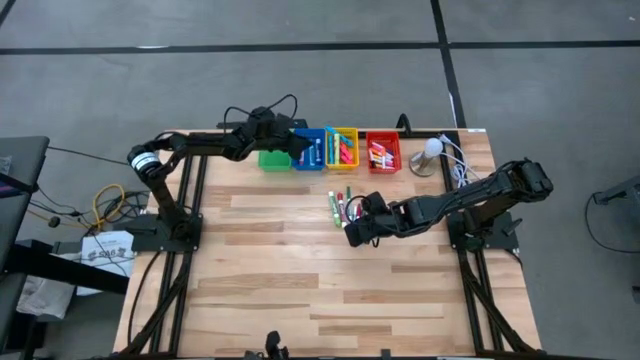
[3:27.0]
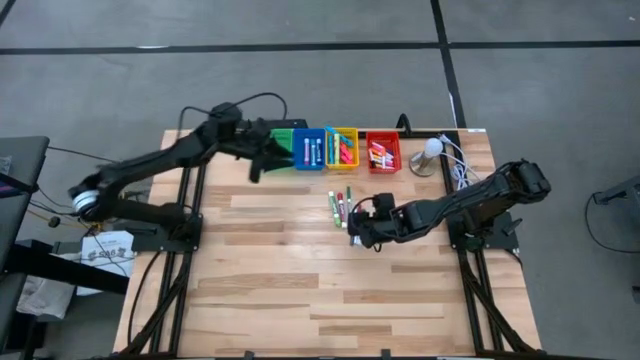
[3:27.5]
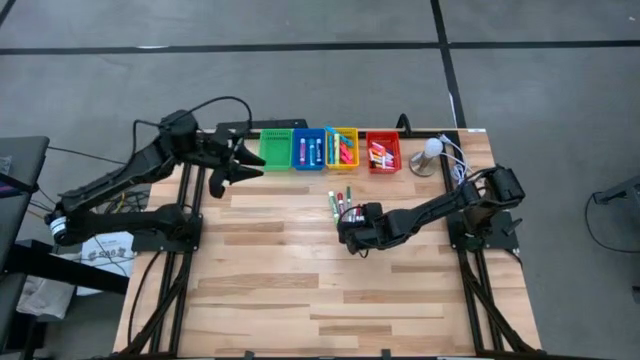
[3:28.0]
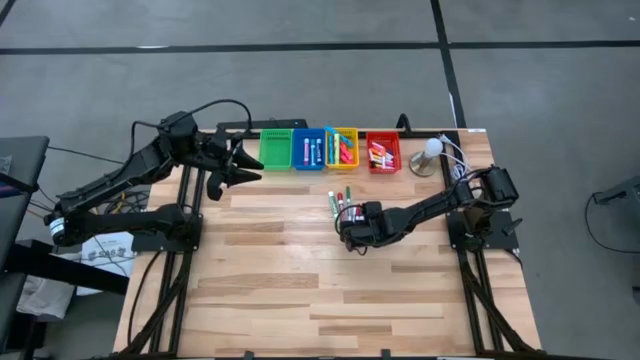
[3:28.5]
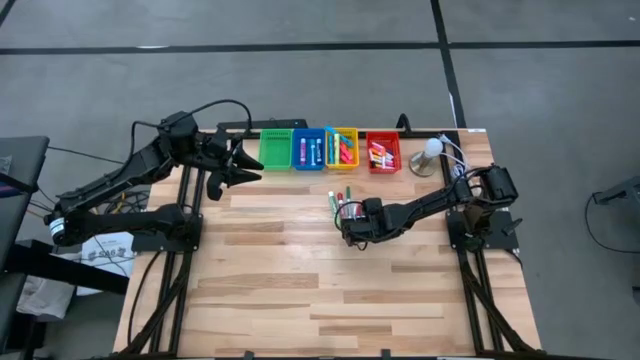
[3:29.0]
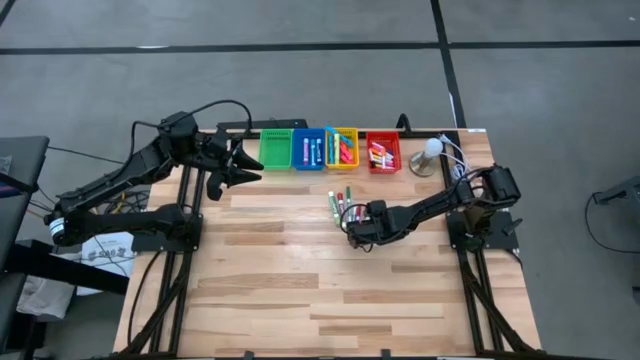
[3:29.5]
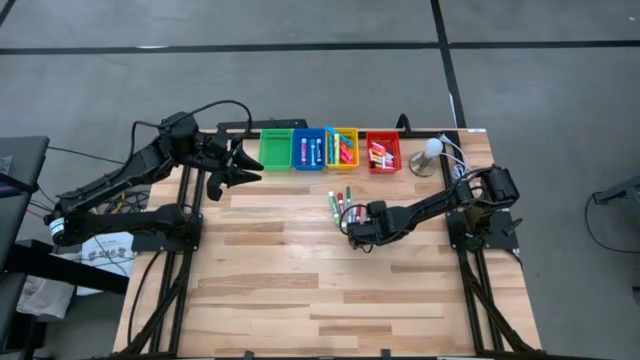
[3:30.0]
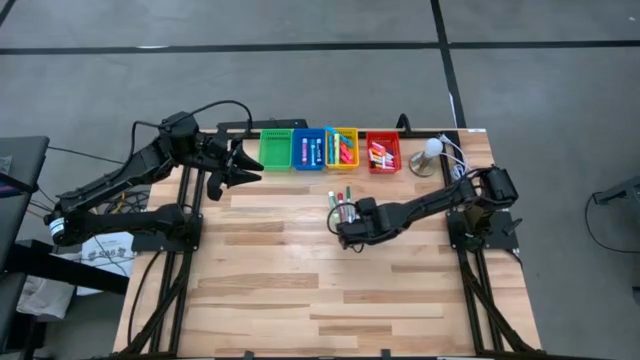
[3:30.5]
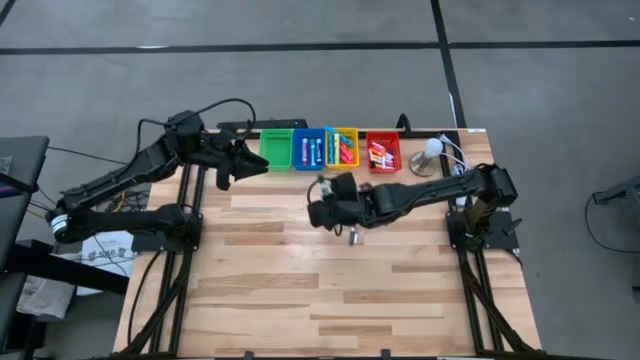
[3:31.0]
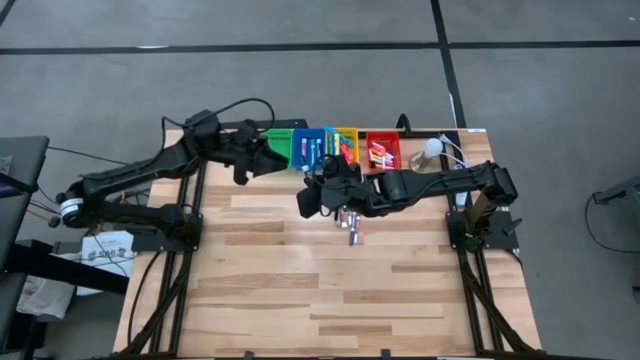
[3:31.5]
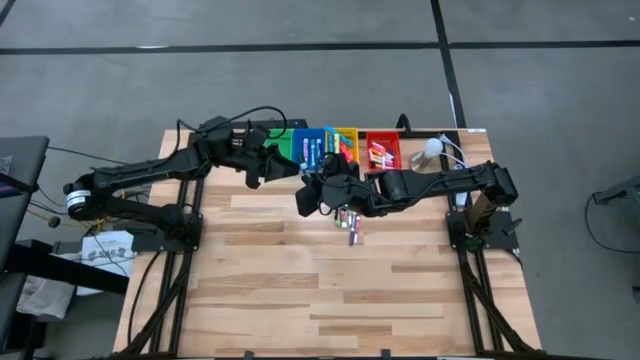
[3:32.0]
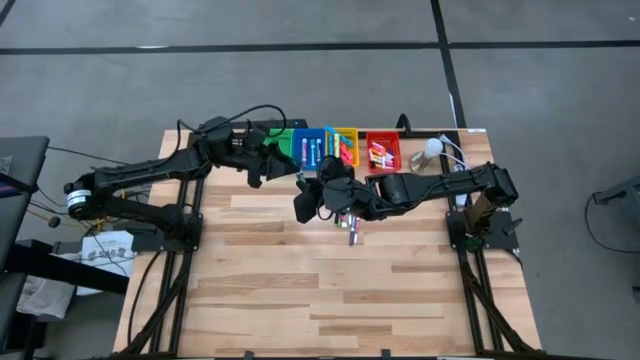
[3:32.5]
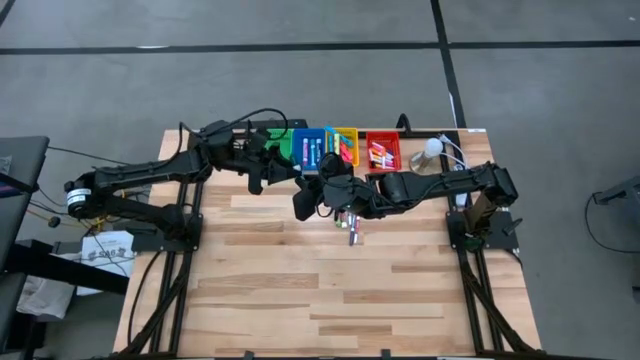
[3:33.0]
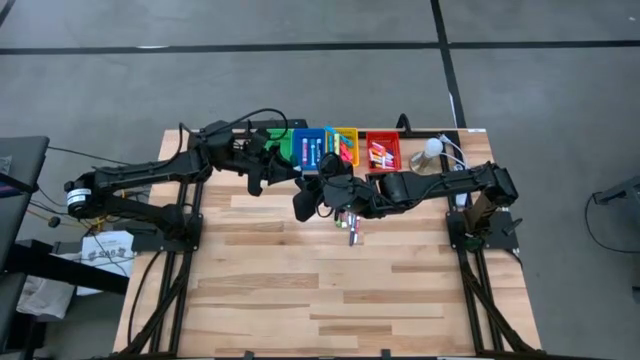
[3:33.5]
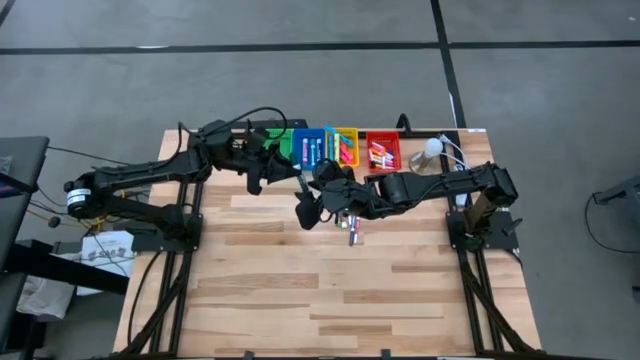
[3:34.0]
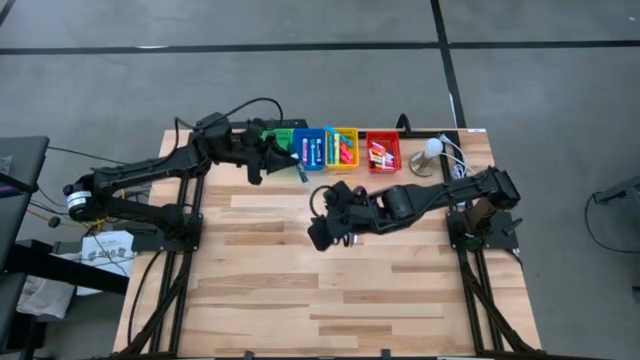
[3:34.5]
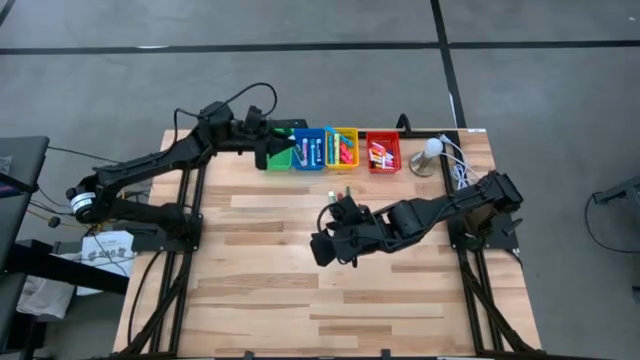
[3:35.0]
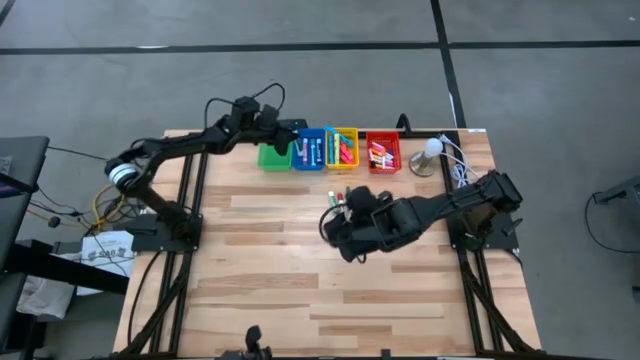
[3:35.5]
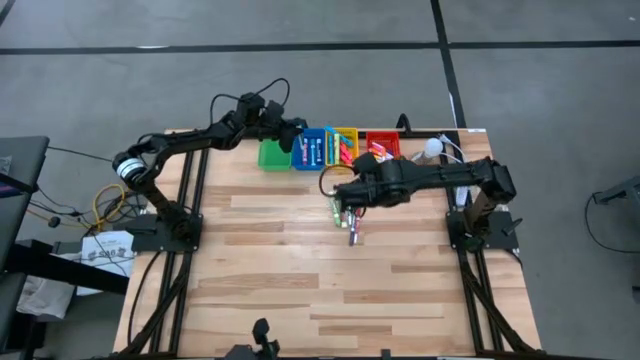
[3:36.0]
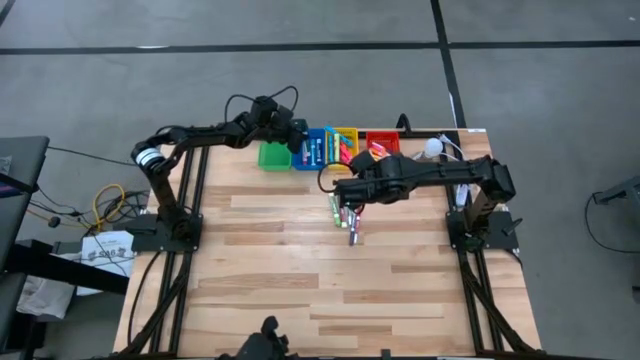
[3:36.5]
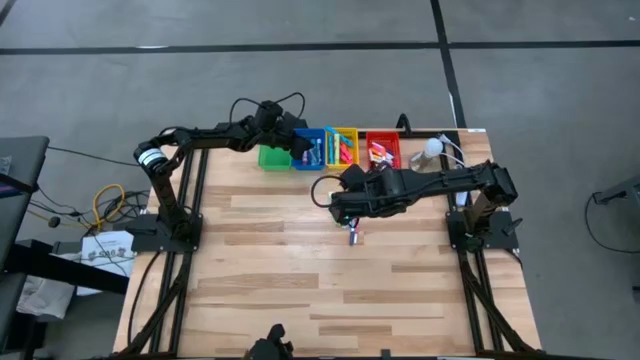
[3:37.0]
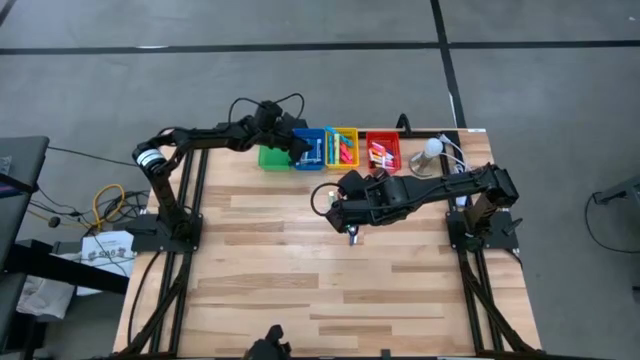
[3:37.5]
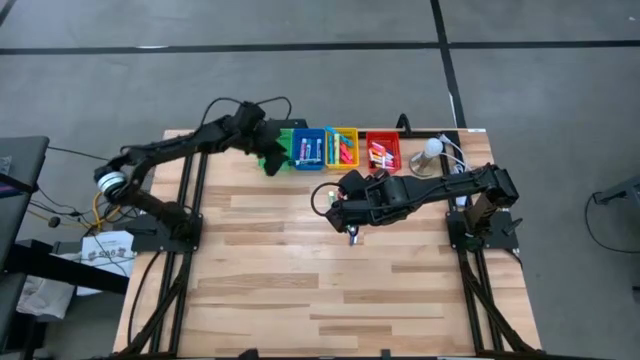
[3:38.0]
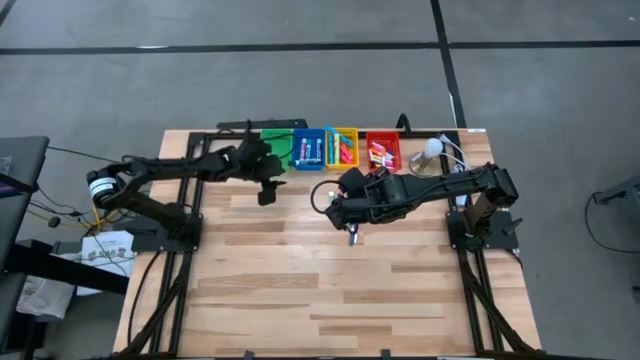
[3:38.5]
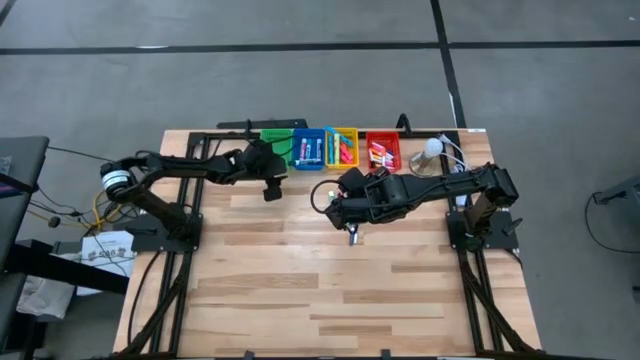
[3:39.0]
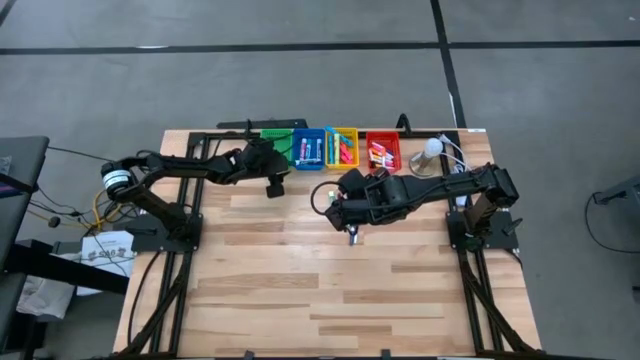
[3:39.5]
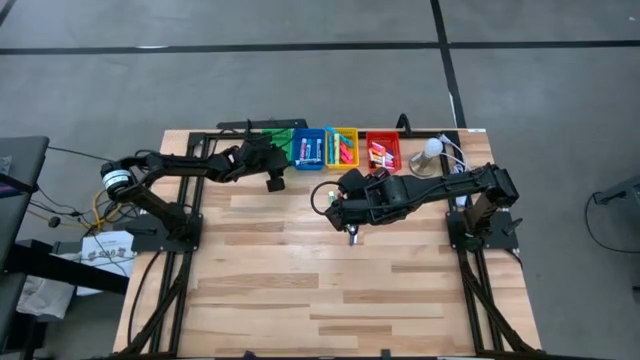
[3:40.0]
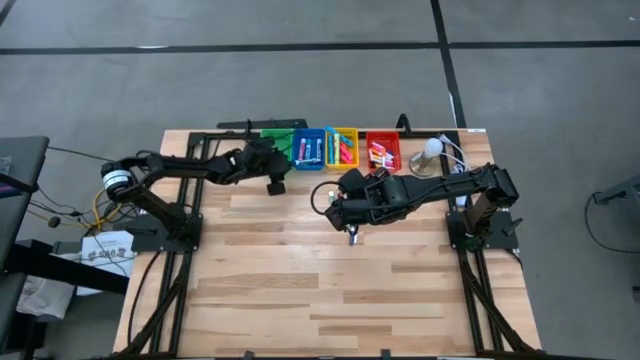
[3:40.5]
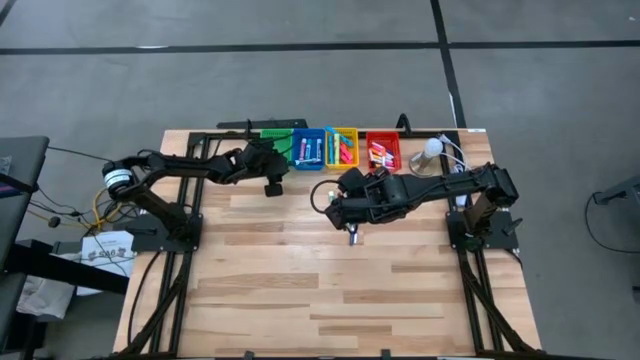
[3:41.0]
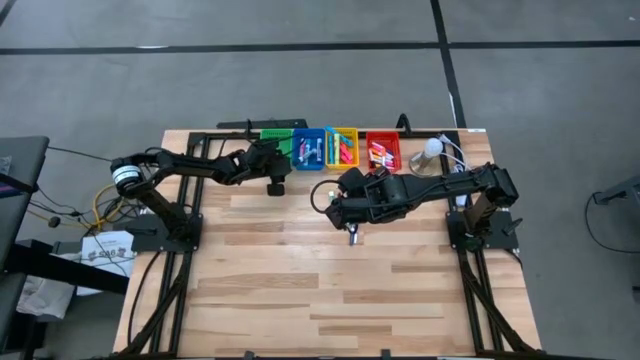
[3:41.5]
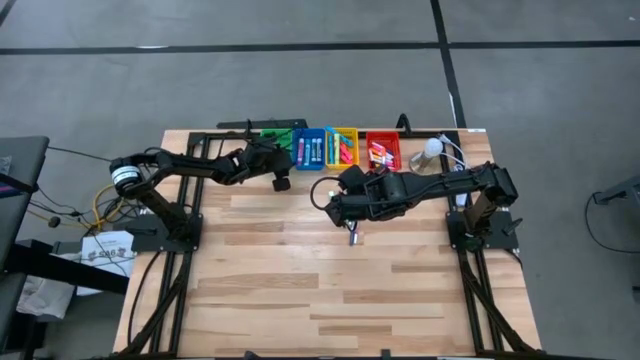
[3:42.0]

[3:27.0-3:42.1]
Task: Pick & Place Markers
Put the dark green dry erase marker into the blue basket

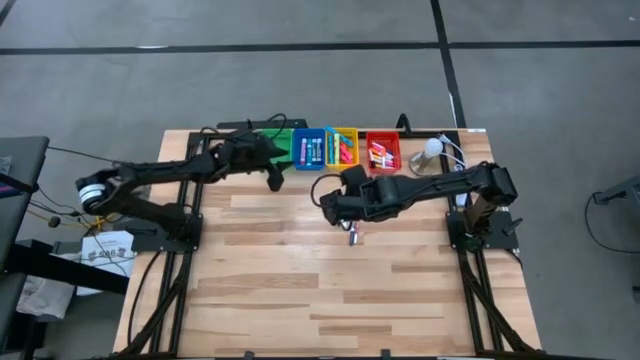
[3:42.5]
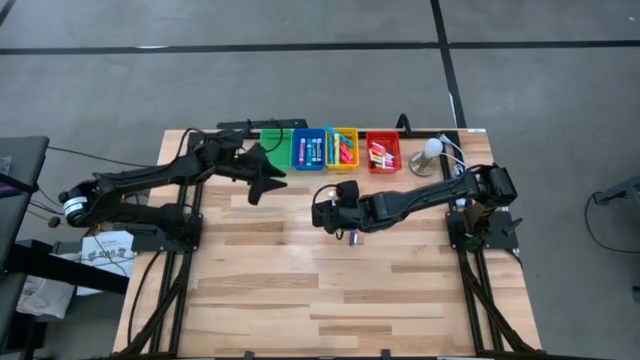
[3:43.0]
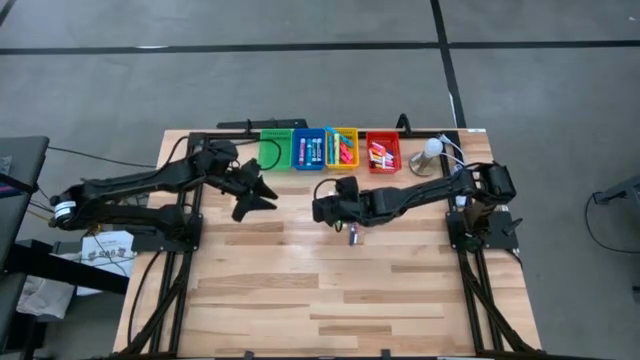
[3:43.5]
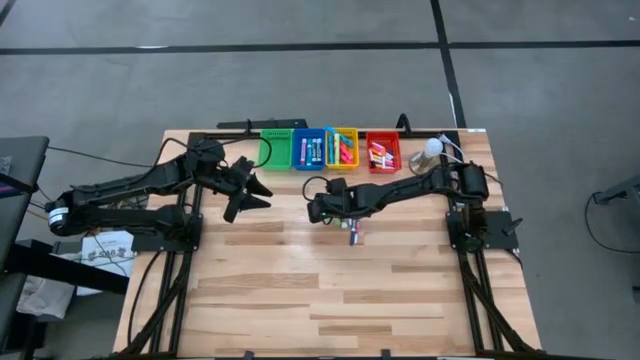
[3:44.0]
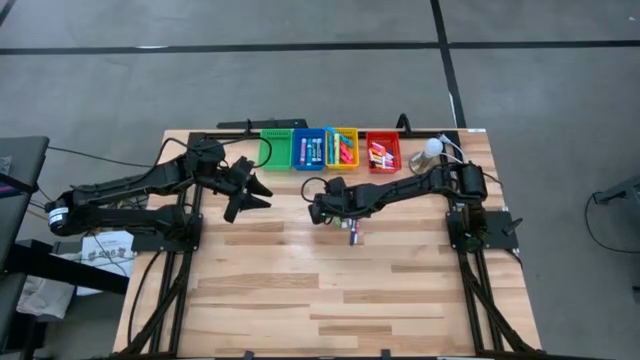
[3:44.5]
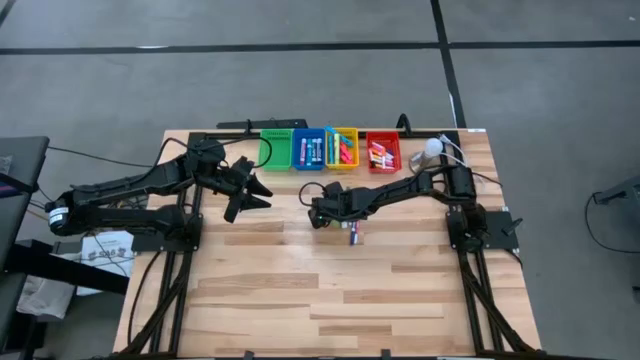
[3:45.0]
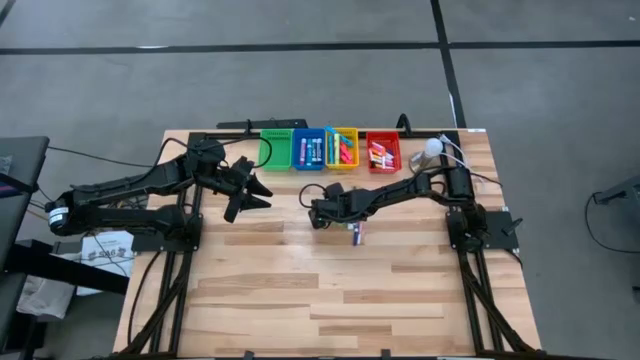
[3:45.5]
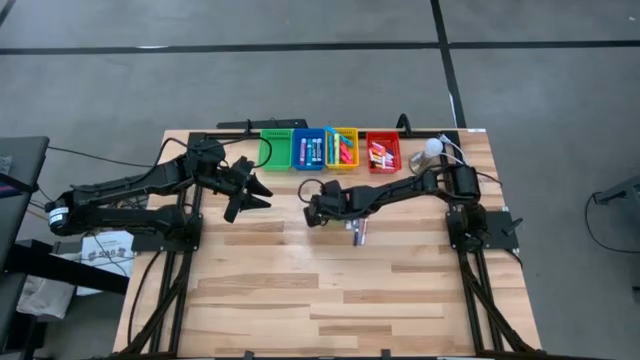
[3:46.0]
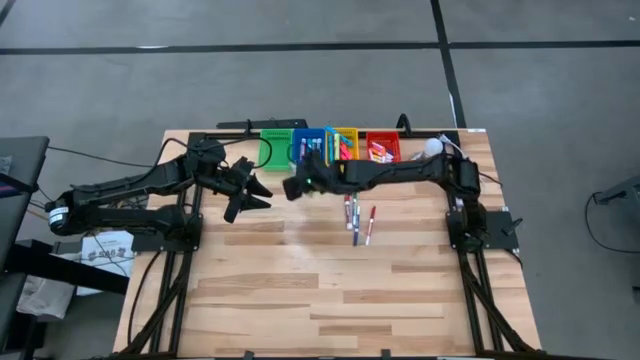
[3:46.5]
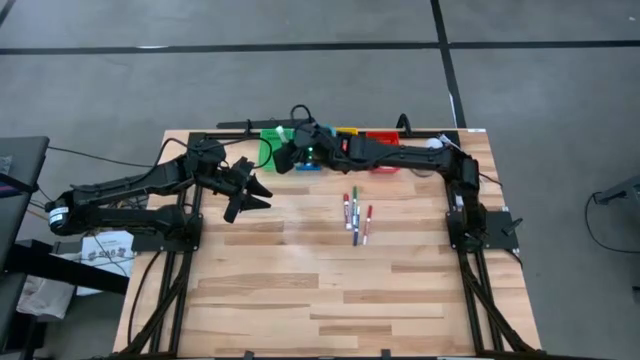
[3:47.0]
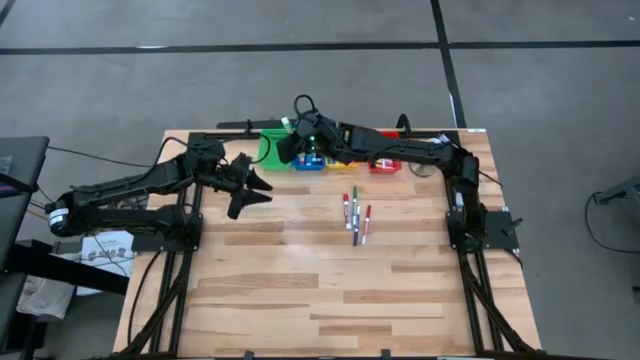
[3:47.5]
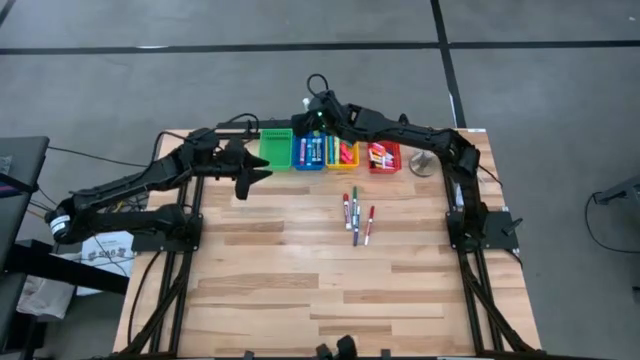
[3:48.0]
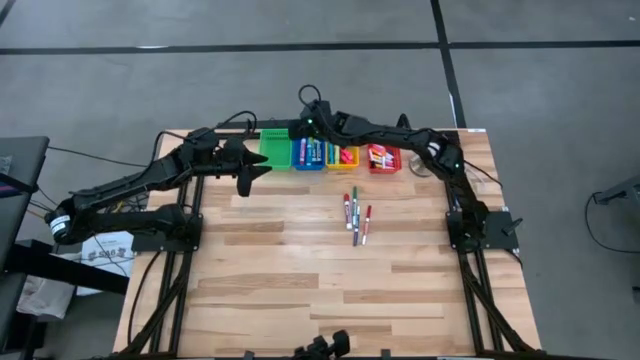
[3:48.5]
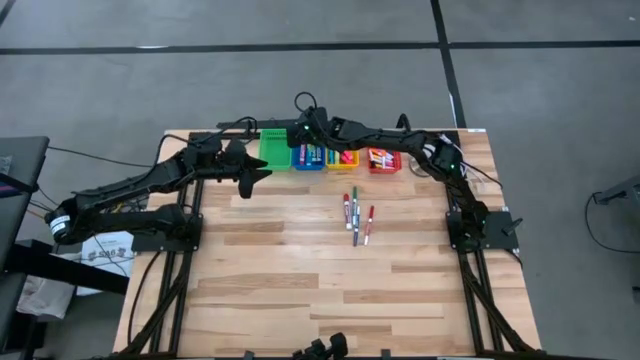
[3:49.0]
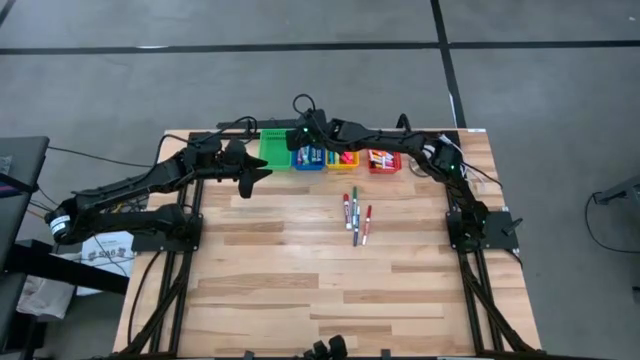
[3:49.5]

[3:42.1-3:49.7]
Put the green dry erase marker into the blue basket
